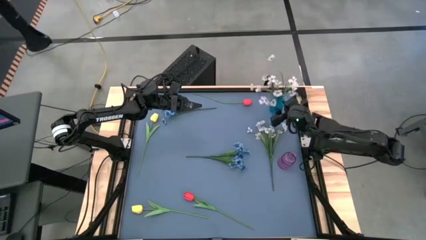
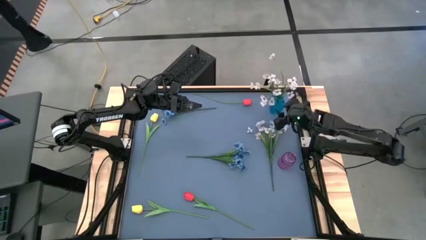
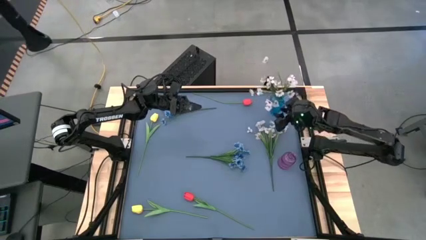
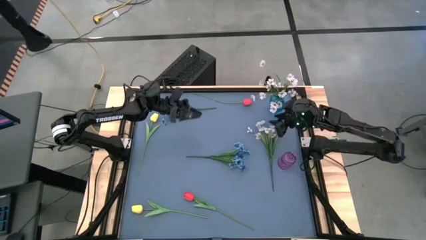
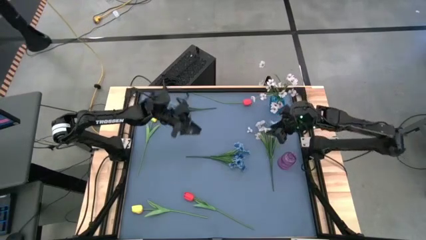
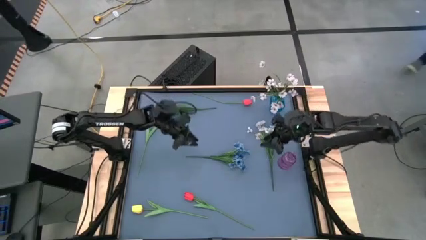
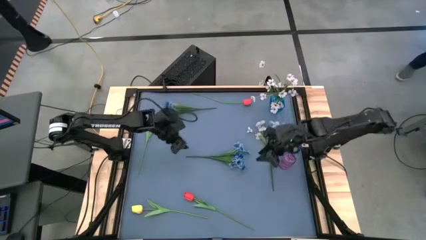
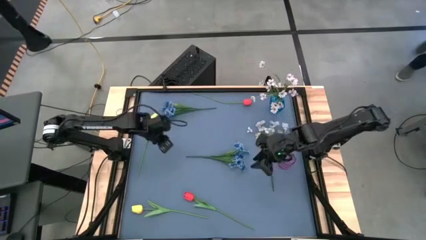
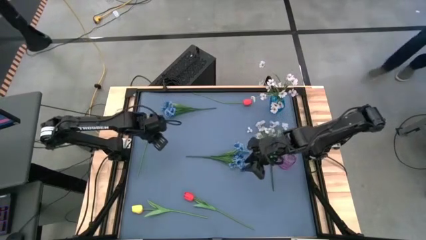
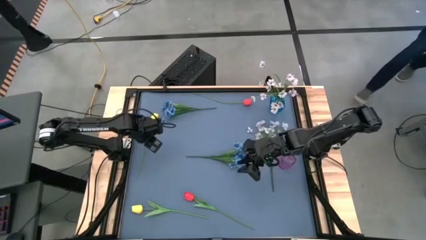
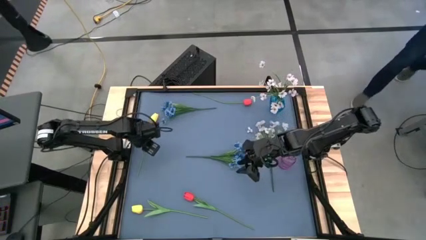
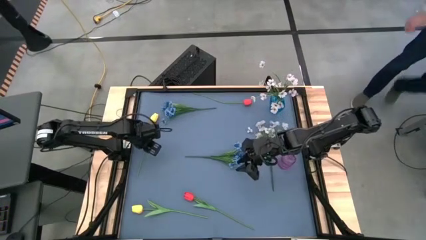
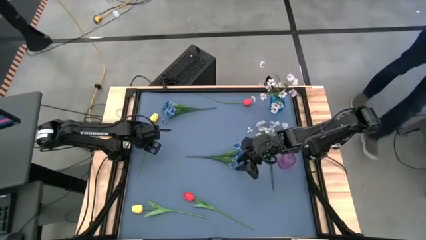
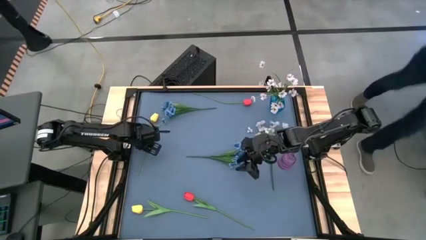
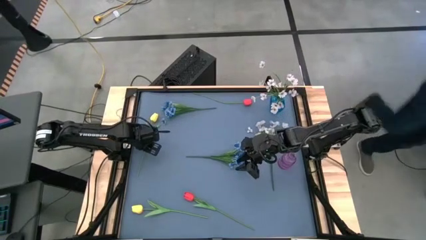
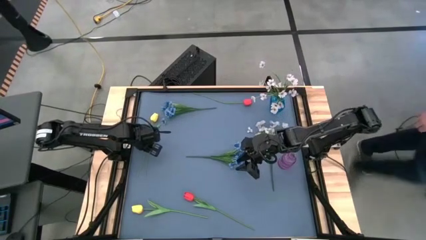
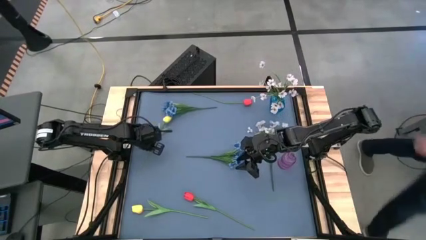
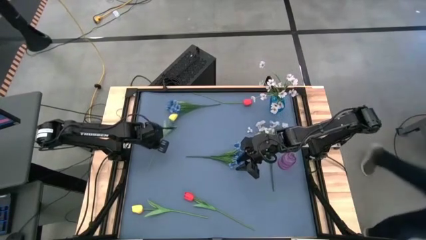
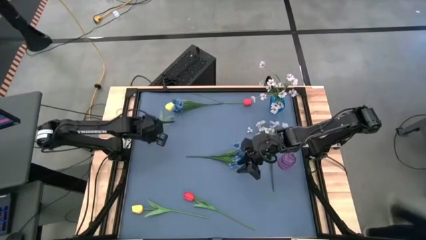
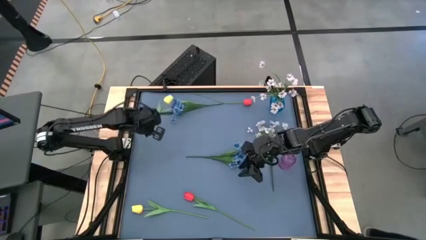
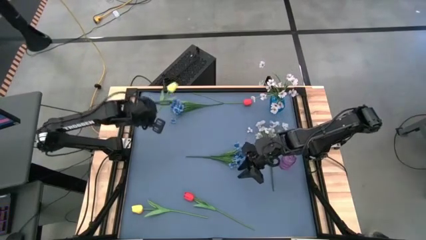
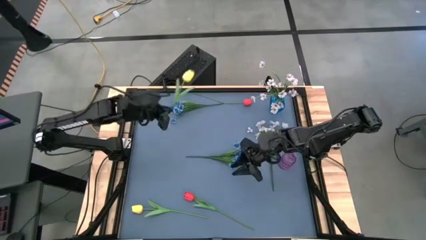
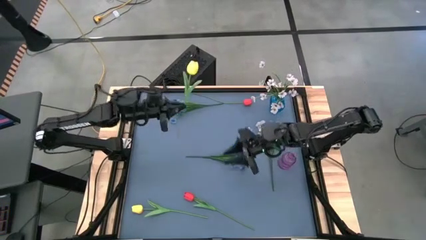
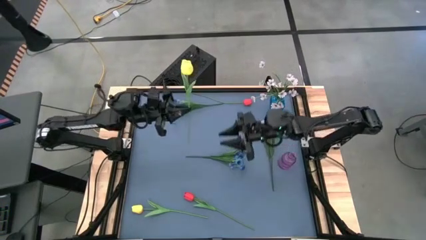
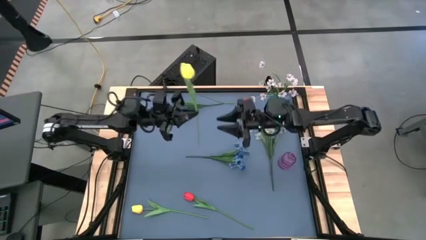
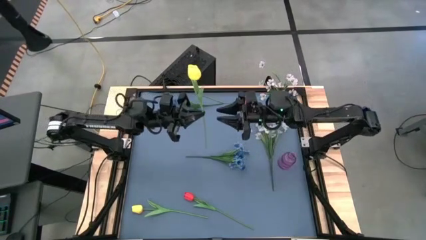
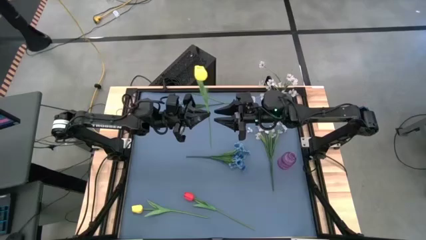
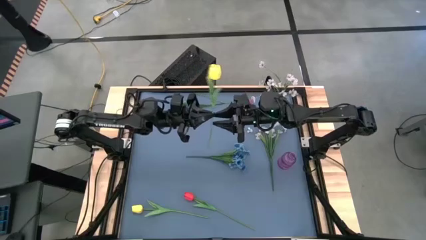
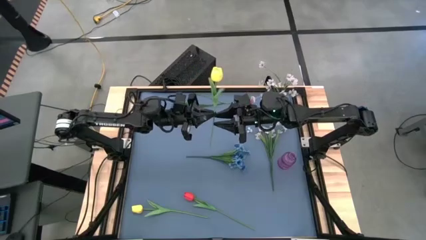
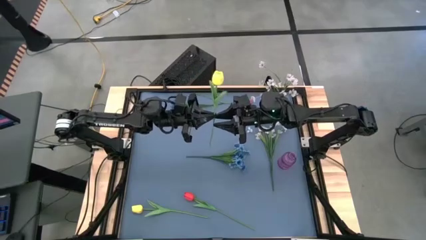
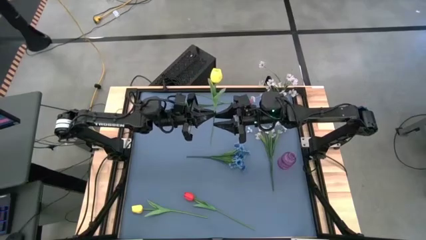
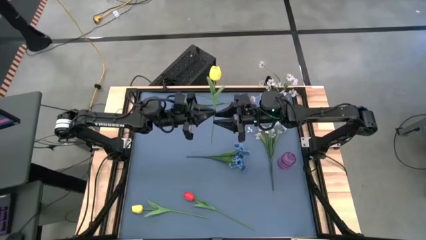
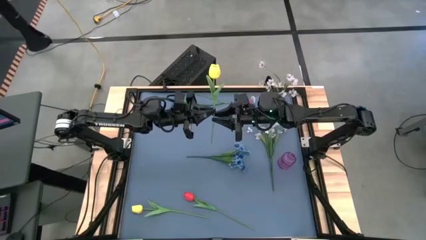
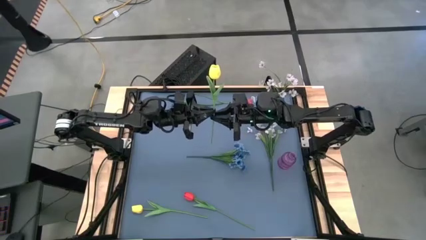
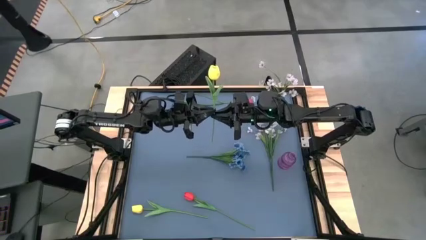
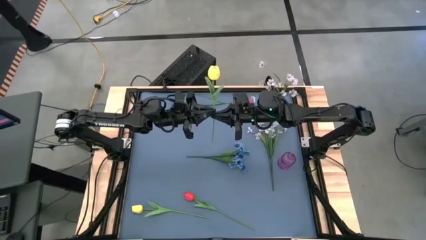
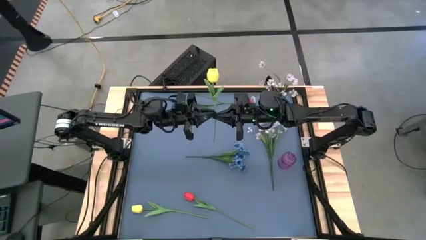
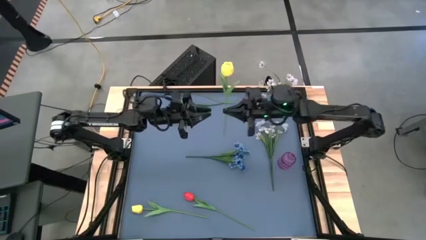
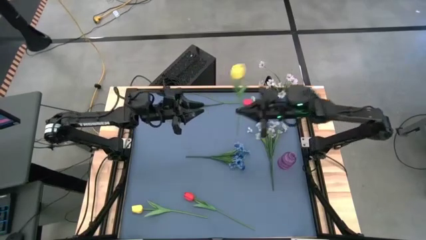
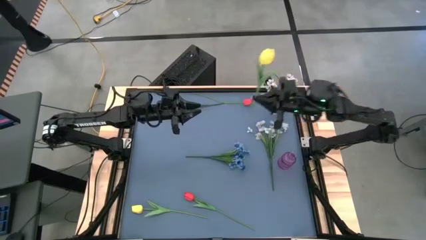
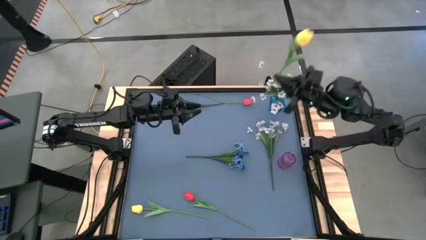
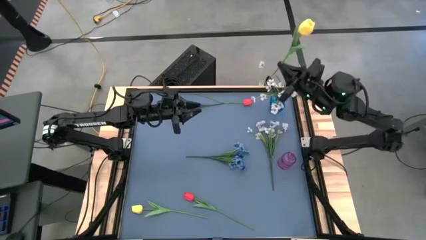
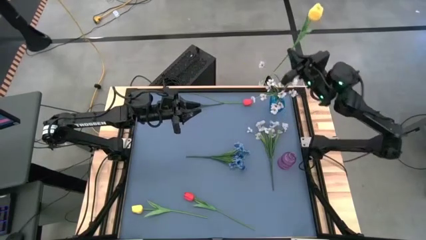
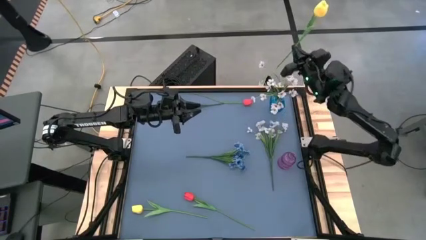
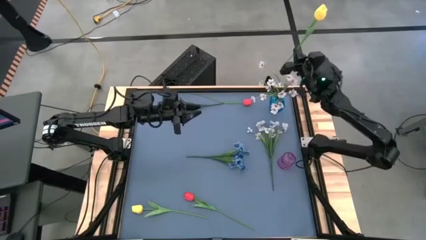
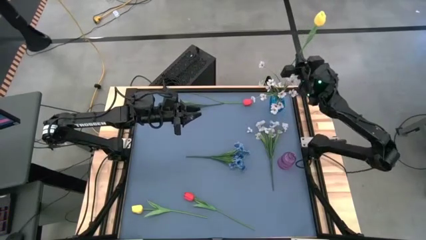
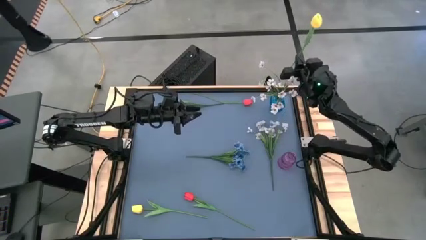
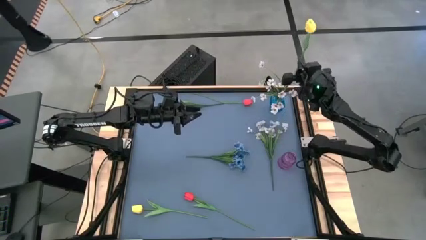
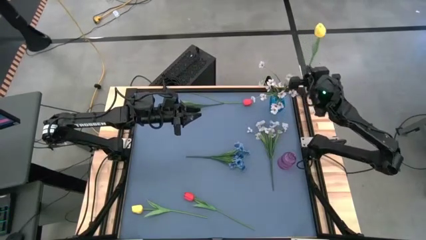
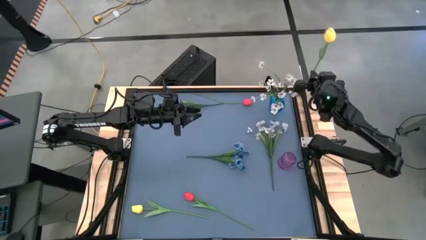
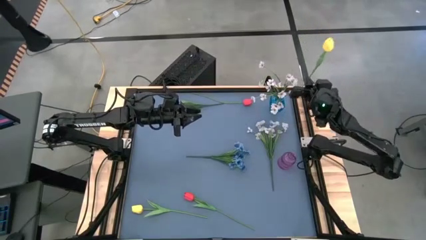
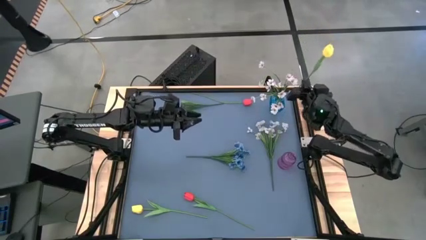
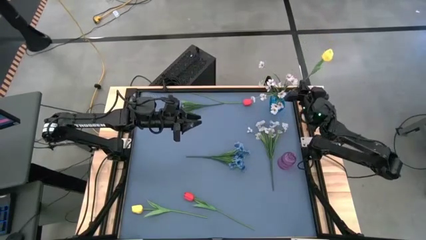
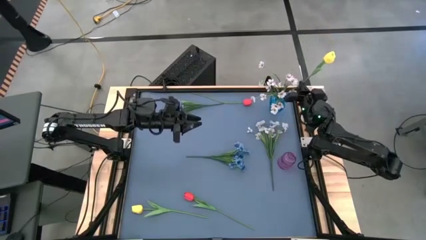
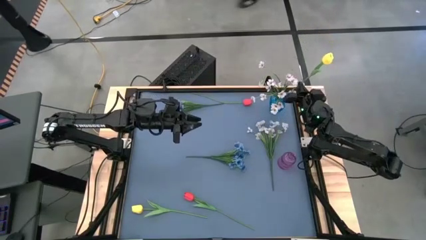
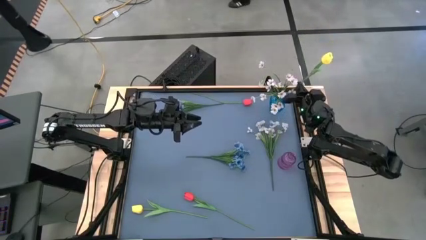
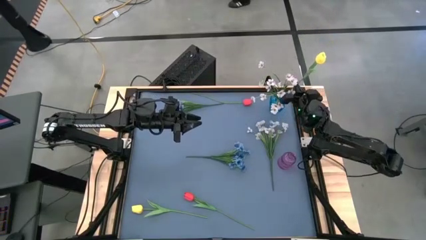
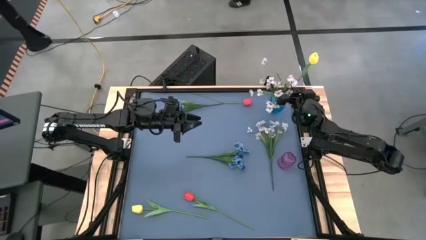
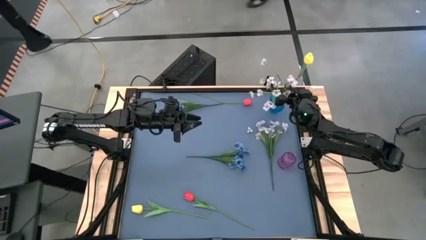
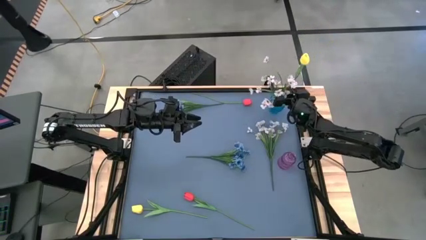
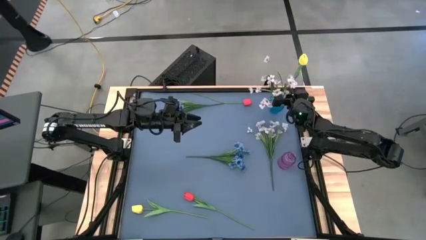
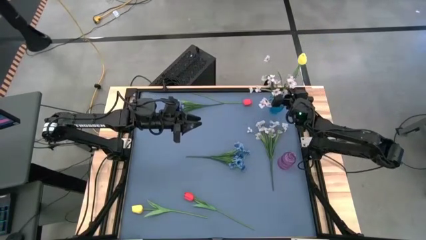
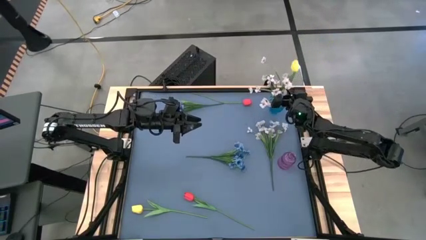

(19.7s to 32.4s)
Task: Sort flowers into vase by color
Put the top yellow flower into the blue vase
